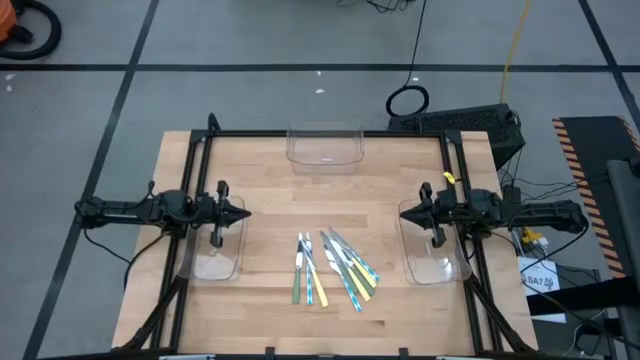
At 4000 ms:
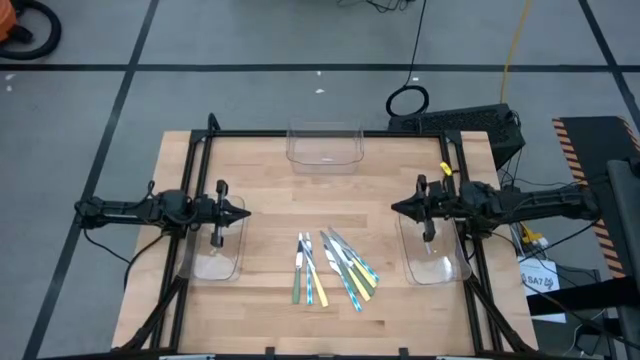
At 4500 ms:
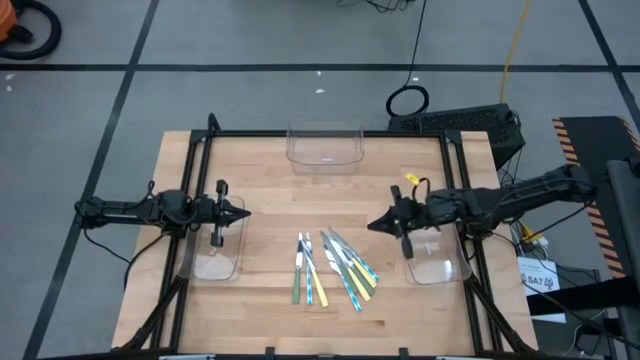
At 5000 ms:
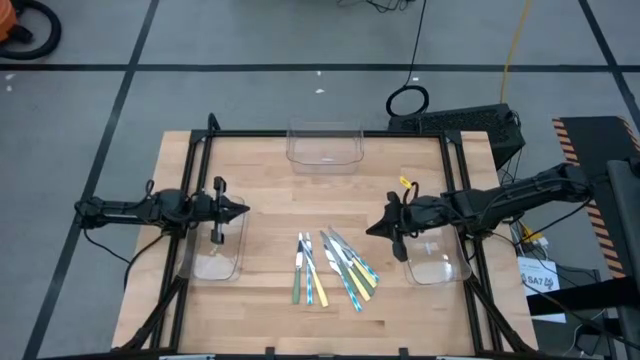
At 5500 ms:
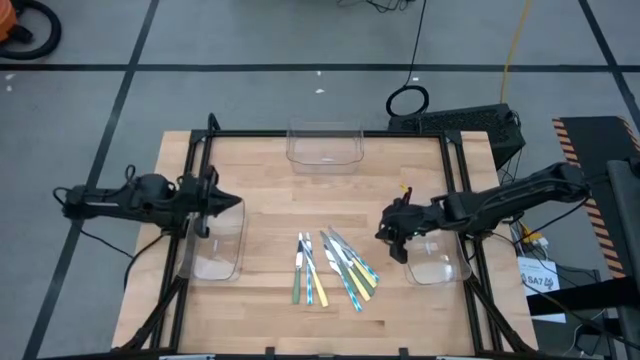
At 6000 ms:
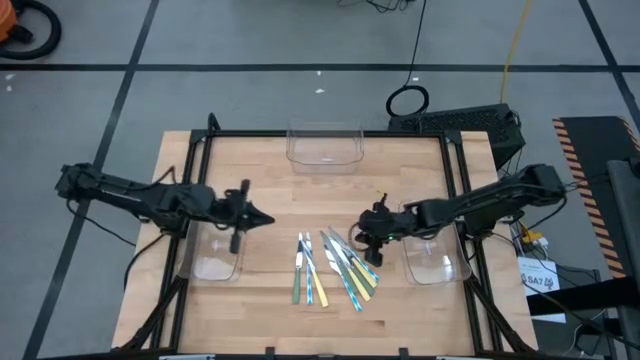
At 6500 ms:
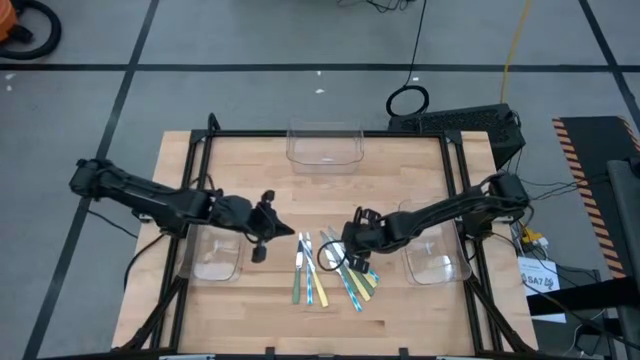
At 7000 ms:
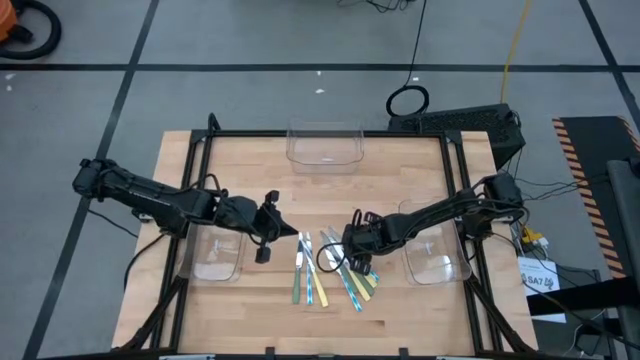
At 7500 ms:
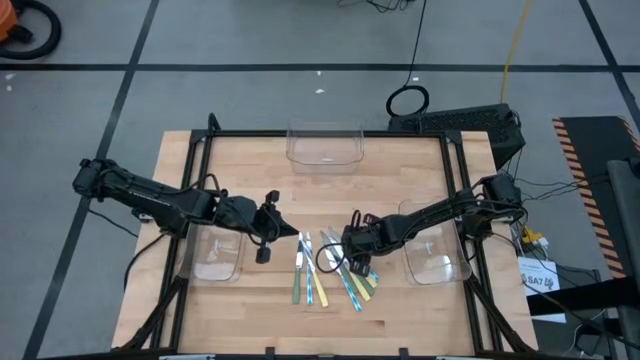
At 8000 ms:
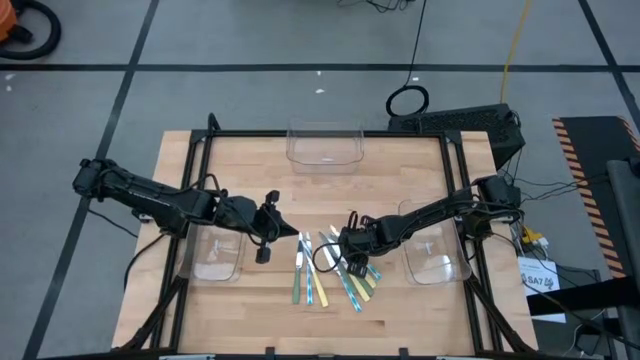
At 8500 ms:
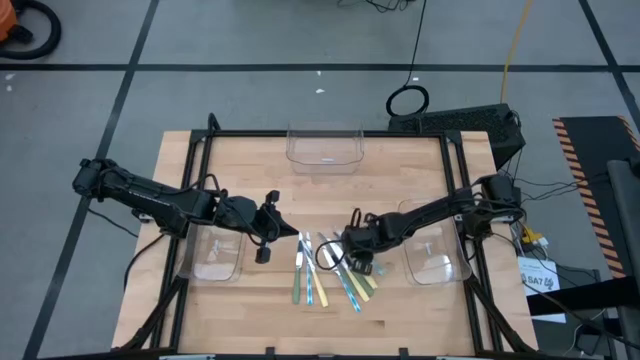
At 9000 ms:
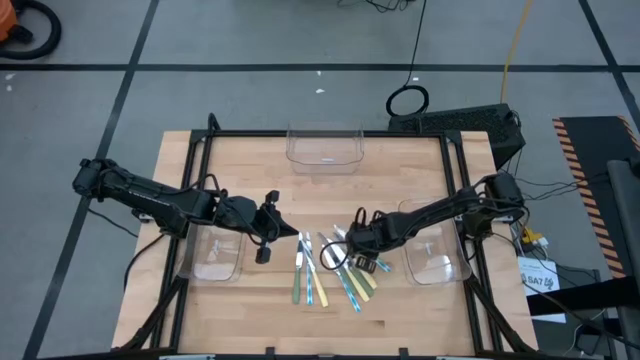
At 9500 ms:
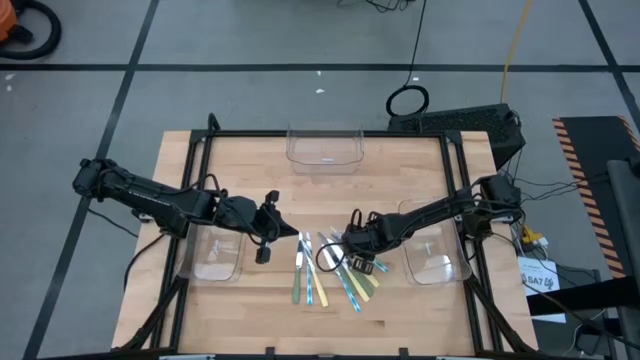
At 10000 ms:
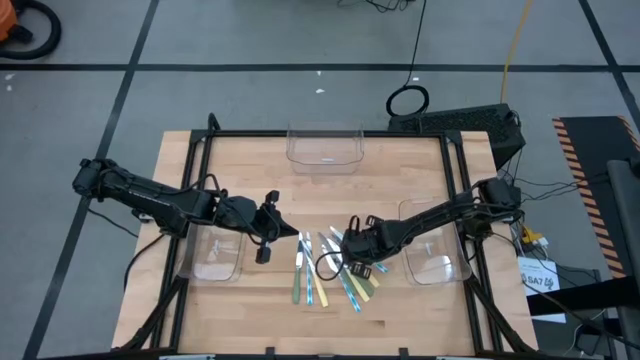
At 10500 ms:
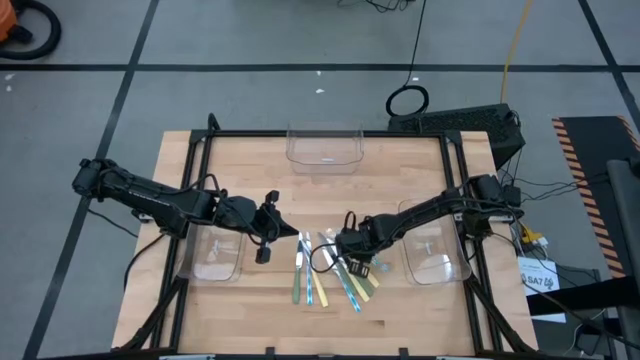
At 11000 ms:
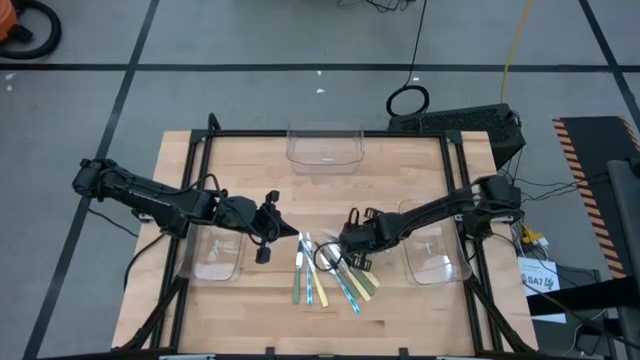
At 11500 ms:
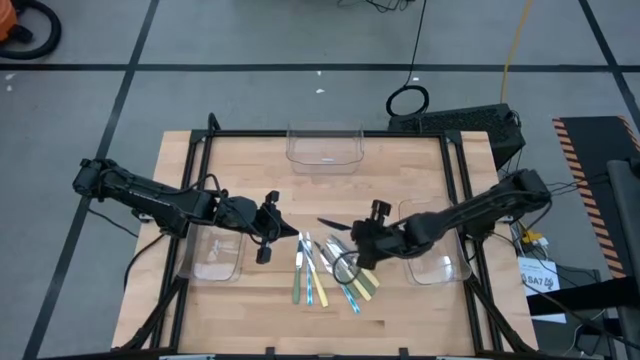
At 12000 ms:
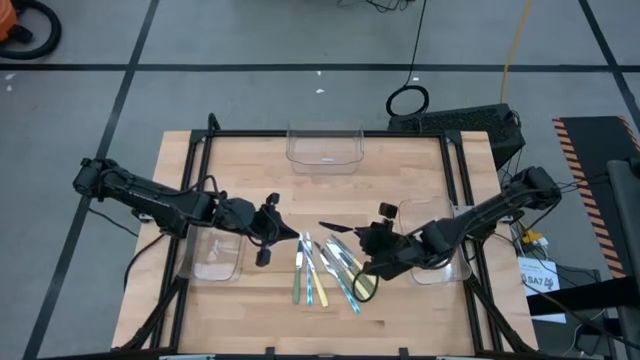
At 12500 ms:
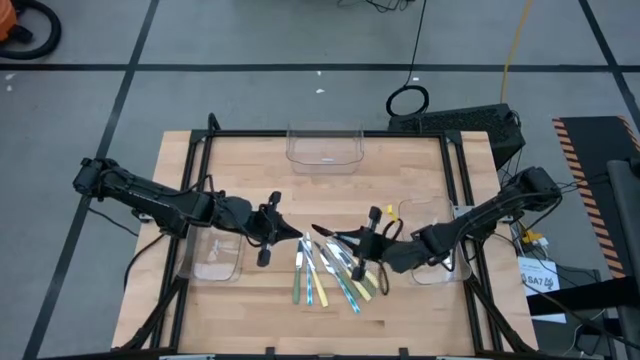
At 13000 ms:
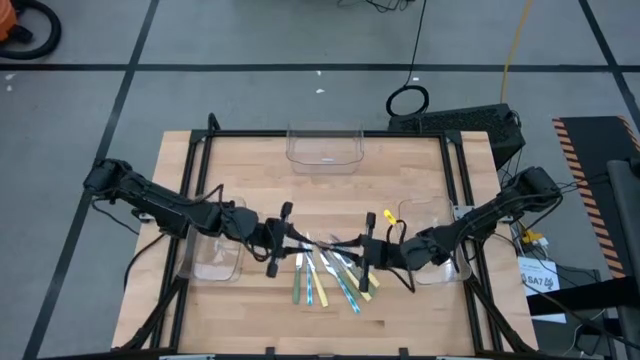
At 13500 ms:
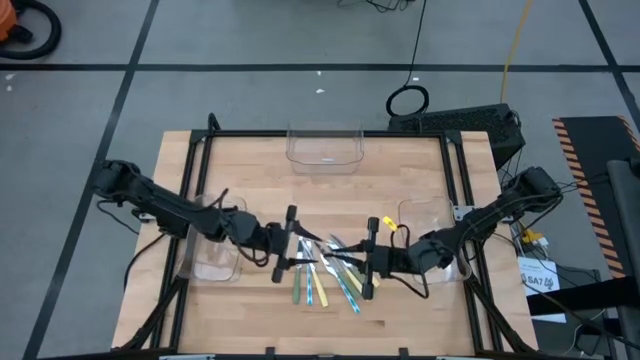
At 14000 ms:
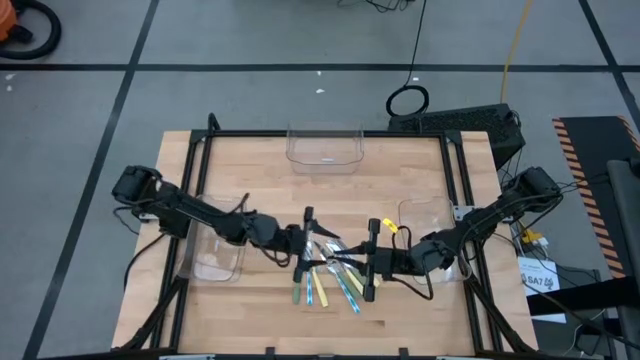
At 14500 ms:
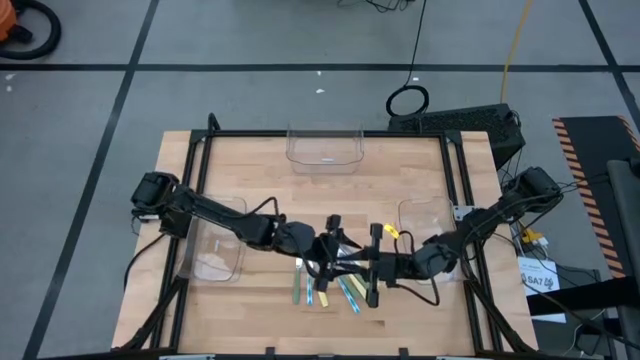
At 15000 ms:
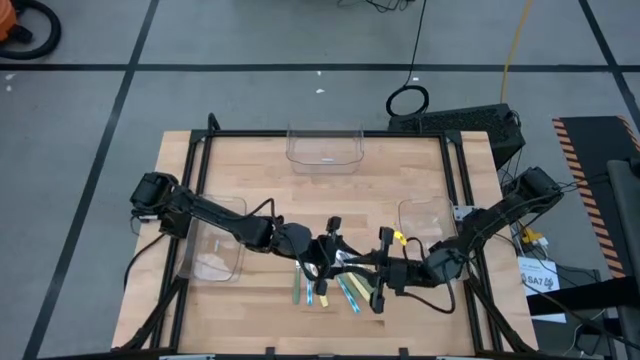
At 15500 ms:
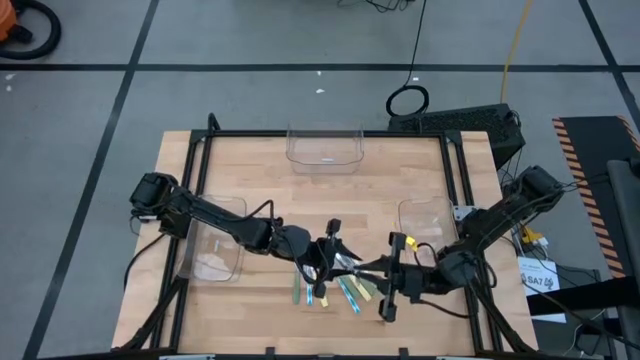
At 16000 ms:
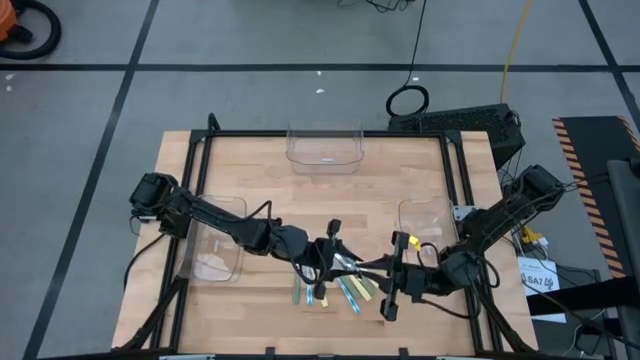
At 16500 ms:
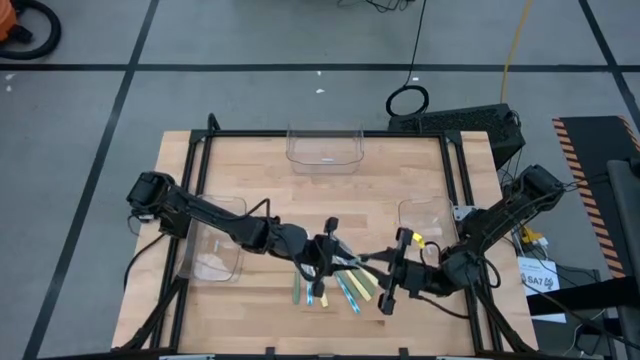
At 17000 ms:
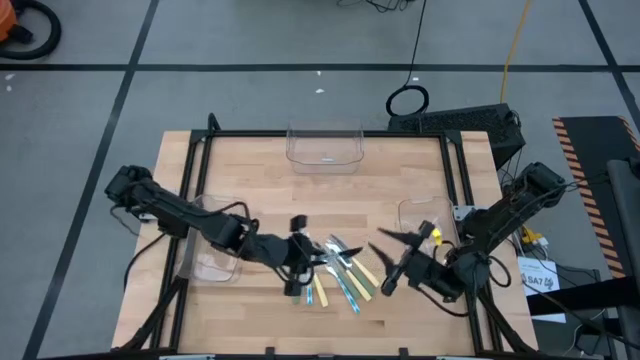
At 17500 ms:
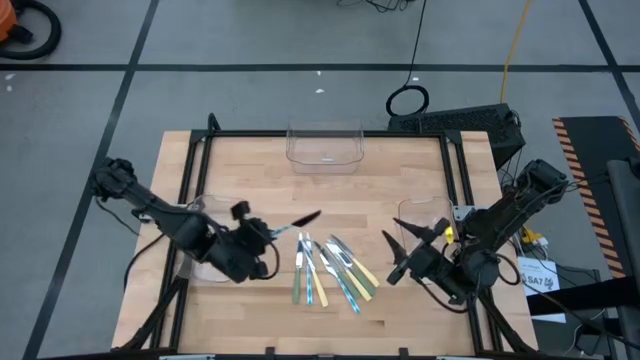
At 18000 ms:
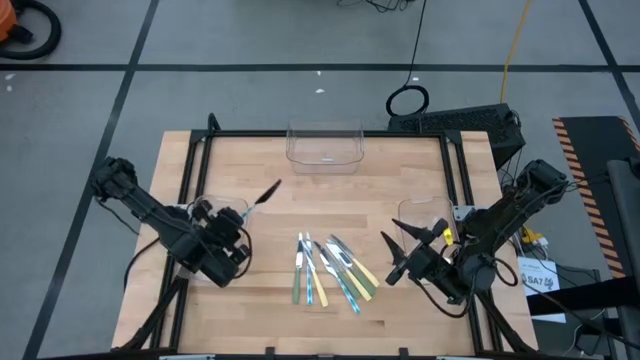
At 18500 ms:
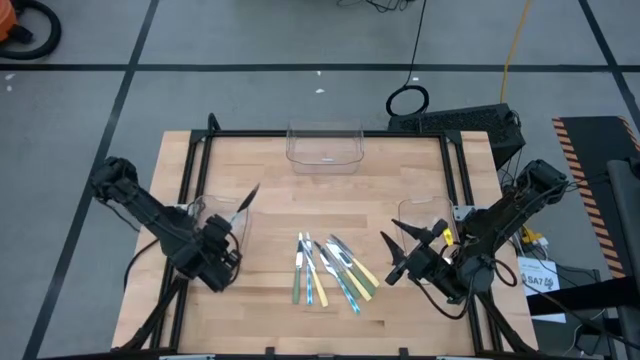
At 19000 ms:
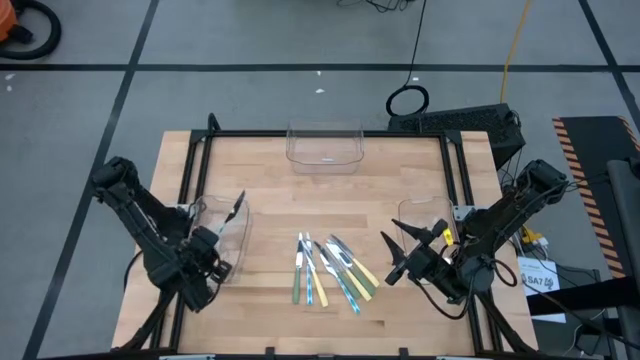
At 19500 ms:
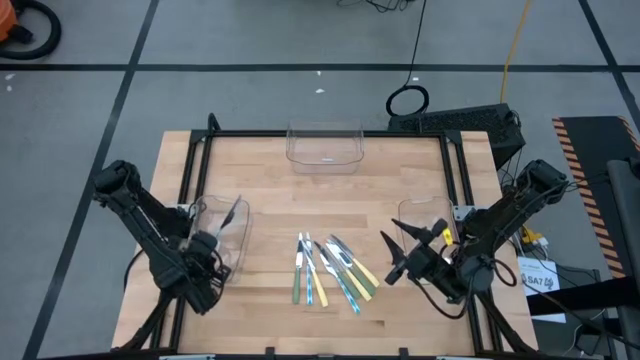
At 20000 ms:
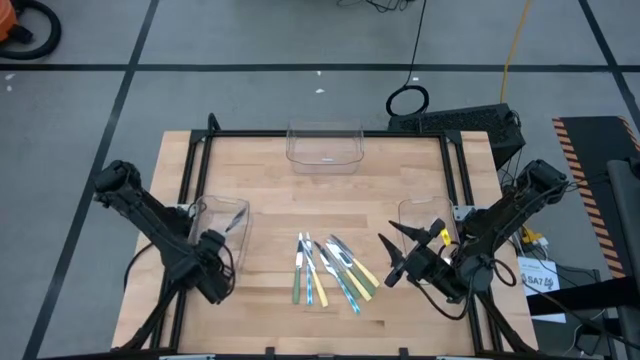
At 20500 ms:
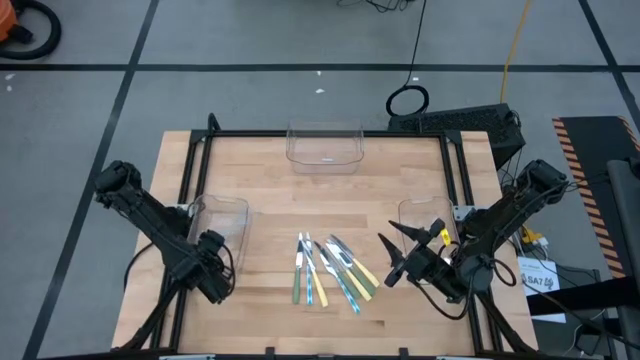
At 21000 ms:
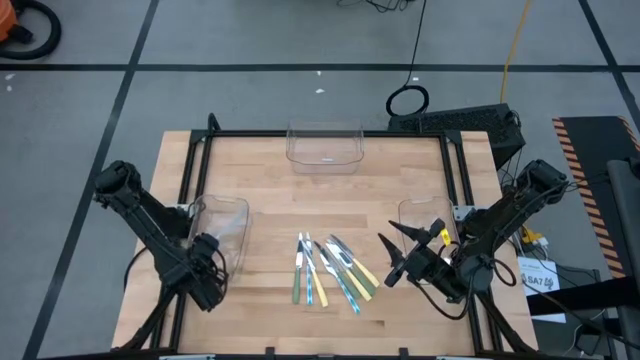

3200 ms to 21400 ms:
Task: Sort silverware by color (type)
Put the right white and blue patterned knife into the bottom left transparent bin

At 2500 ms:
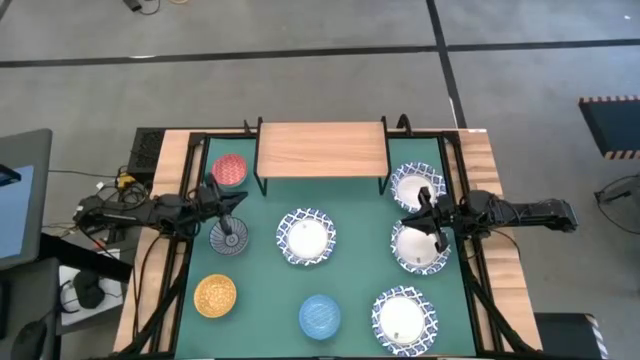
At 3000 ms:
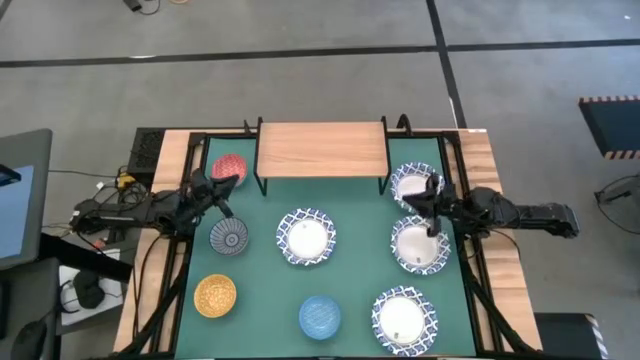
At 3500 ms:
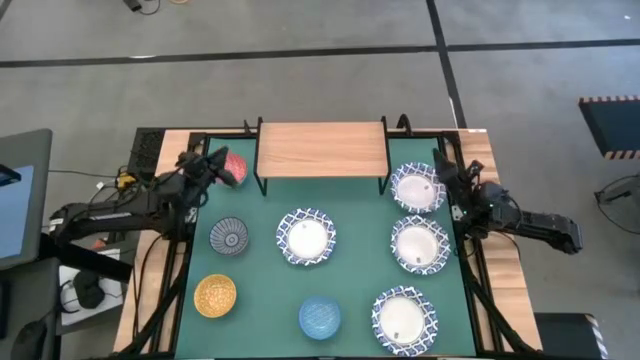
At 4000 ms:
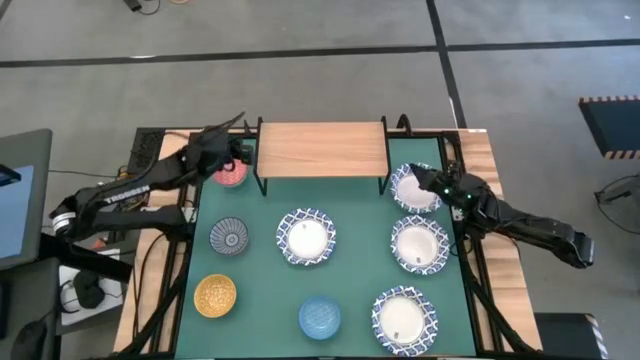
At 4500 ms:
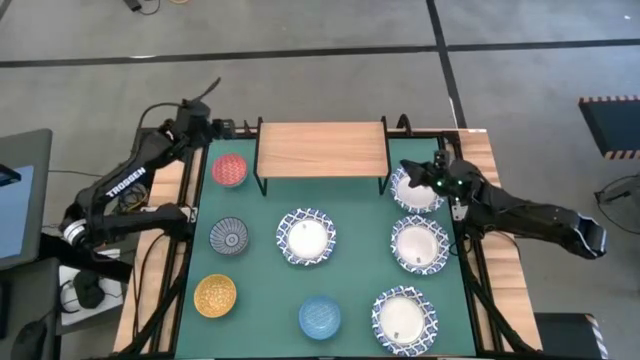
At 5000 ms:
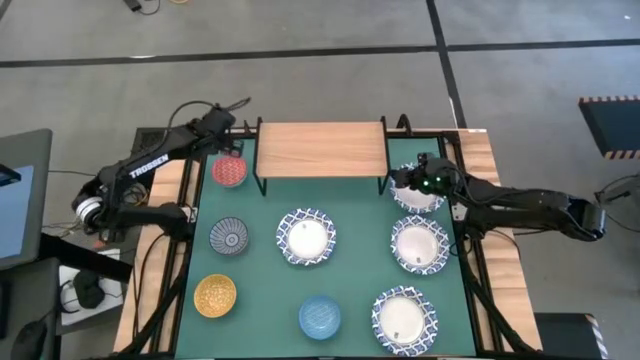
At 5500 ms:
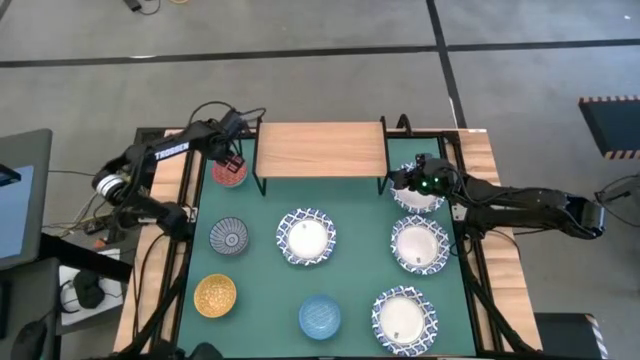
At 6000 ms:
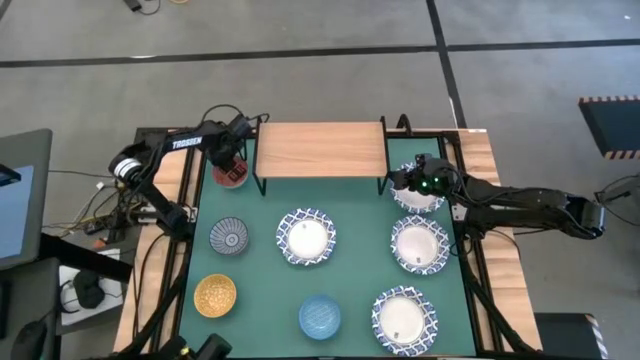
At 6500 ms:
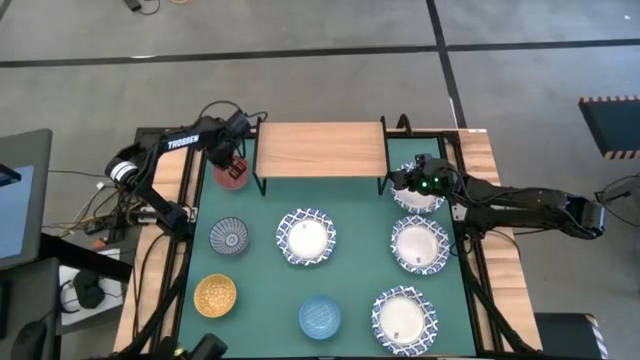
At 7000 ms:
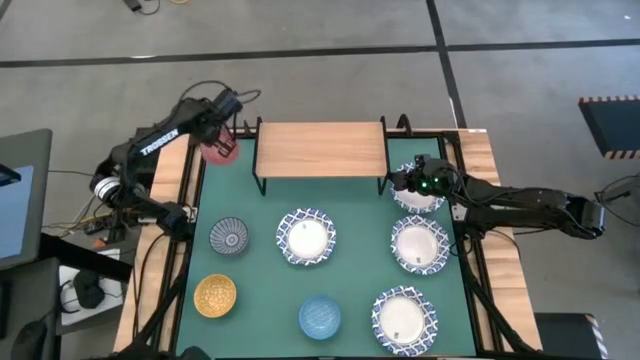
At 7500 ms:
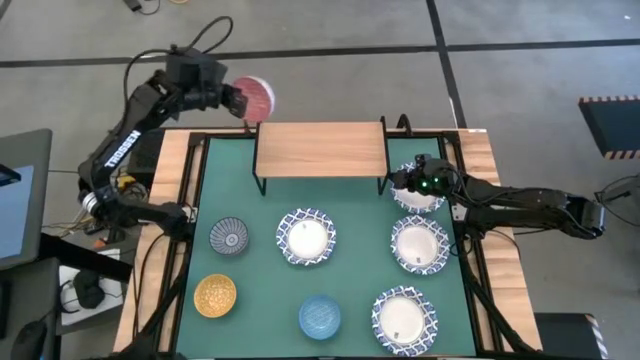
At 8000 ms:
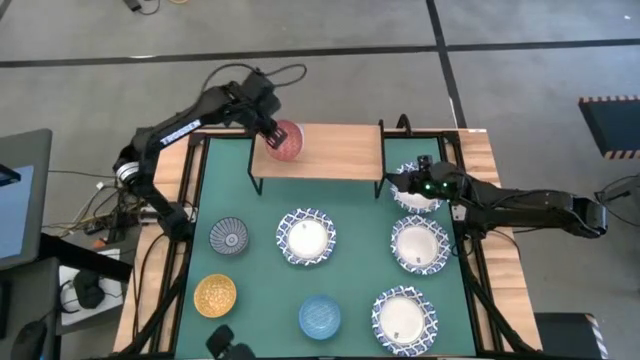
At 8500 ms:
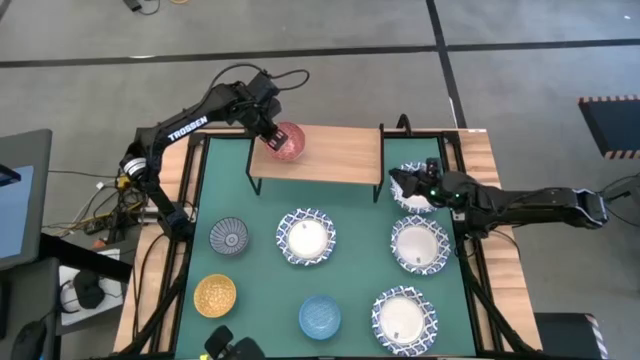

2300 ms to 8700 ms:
Task: Place and stack bowls onto a shelf
Put the red patterned bowl on the shelf
